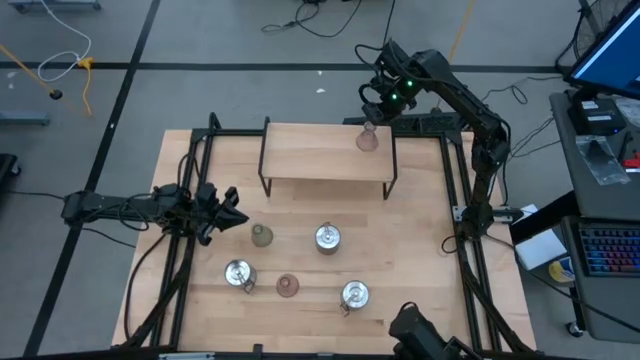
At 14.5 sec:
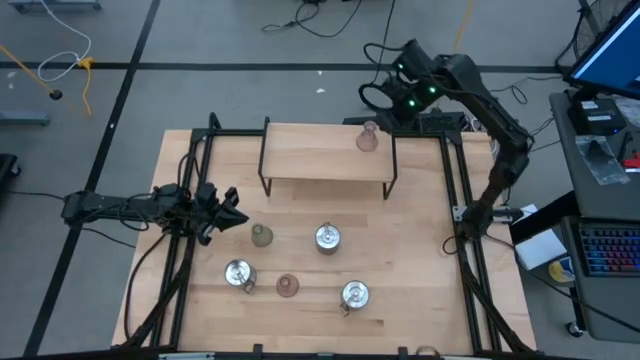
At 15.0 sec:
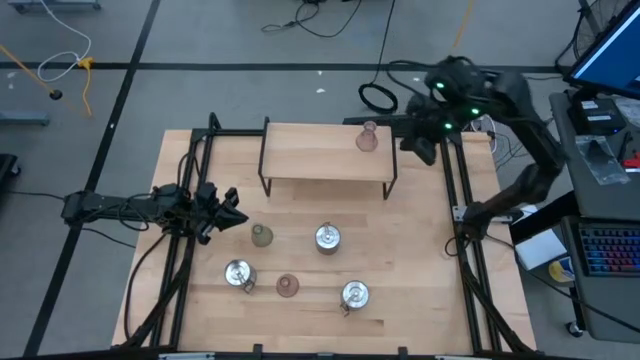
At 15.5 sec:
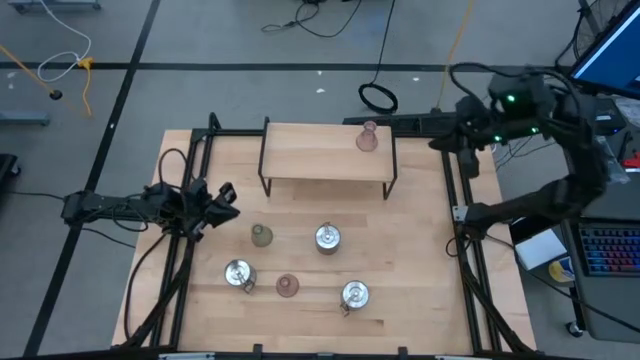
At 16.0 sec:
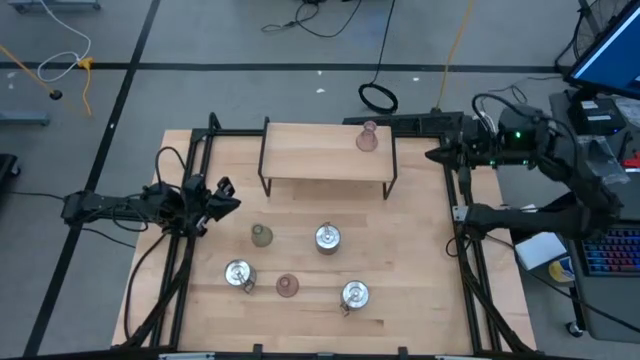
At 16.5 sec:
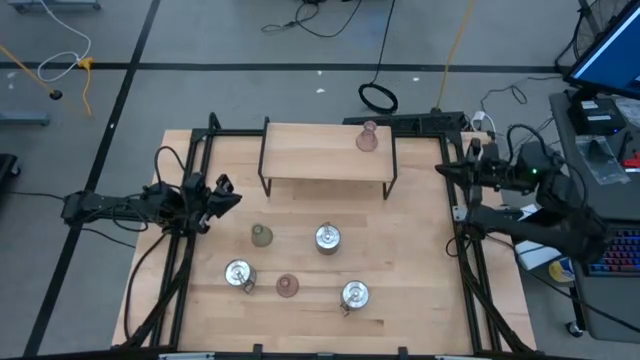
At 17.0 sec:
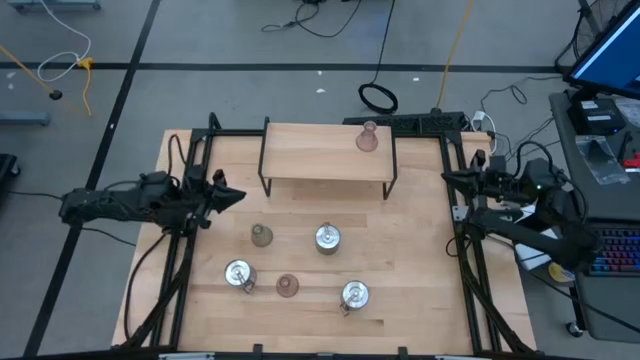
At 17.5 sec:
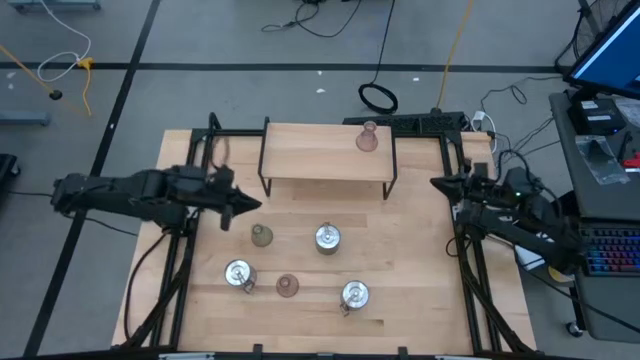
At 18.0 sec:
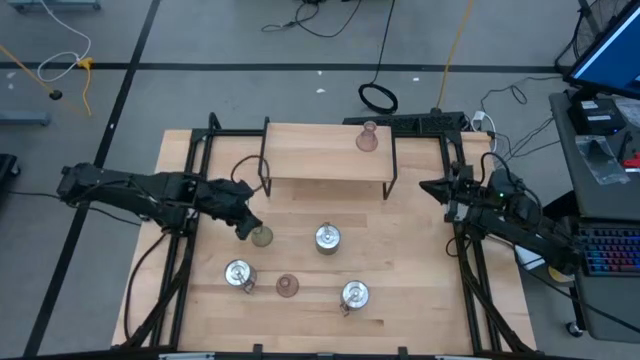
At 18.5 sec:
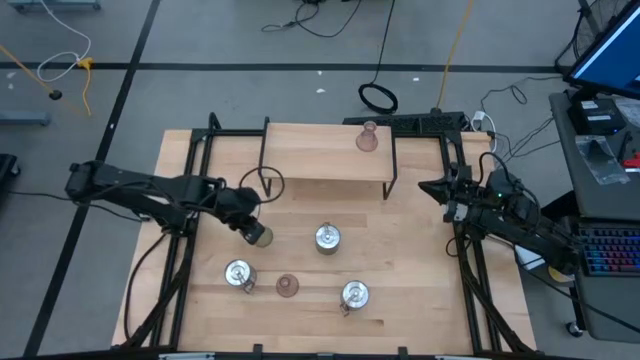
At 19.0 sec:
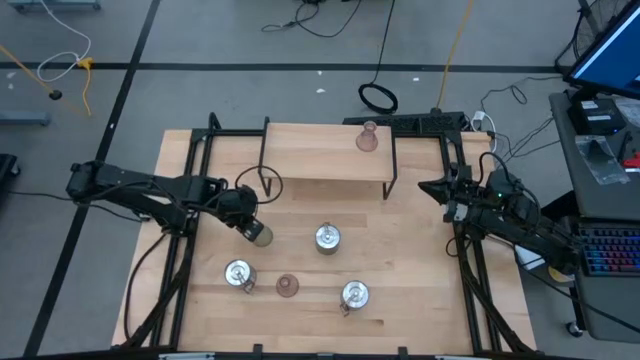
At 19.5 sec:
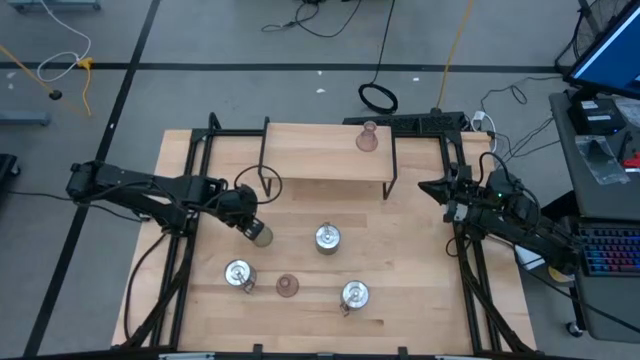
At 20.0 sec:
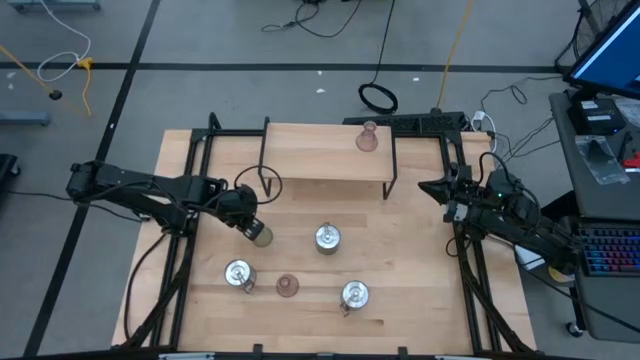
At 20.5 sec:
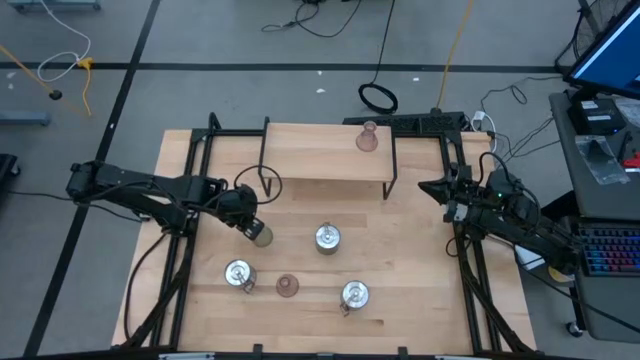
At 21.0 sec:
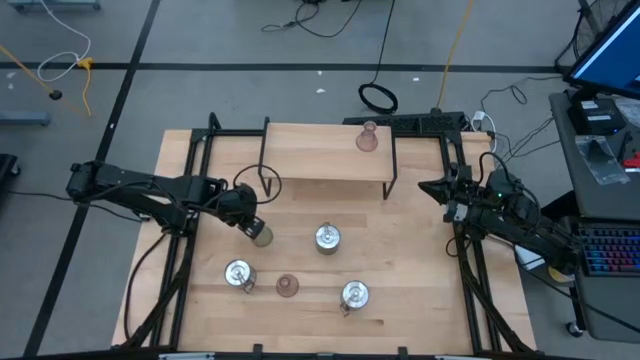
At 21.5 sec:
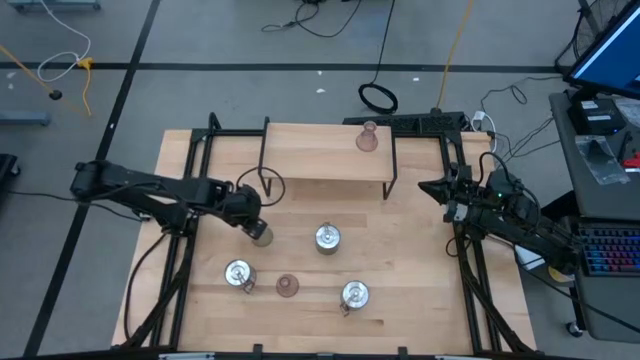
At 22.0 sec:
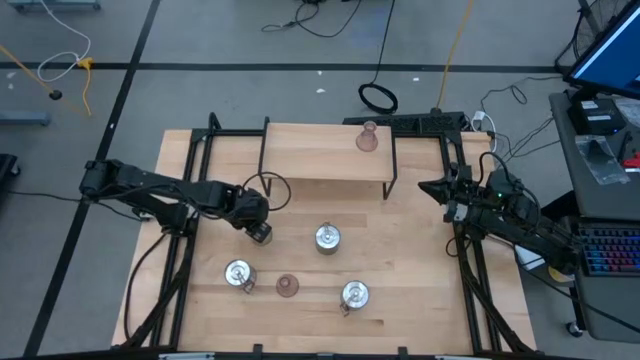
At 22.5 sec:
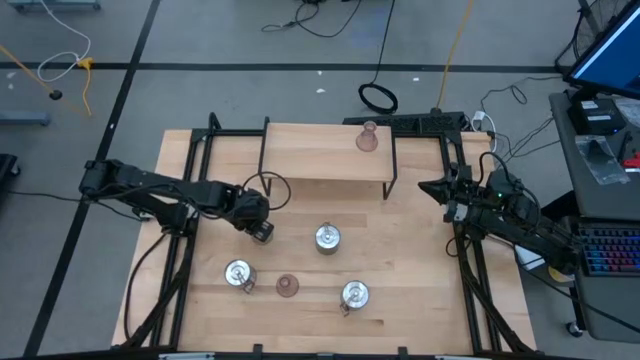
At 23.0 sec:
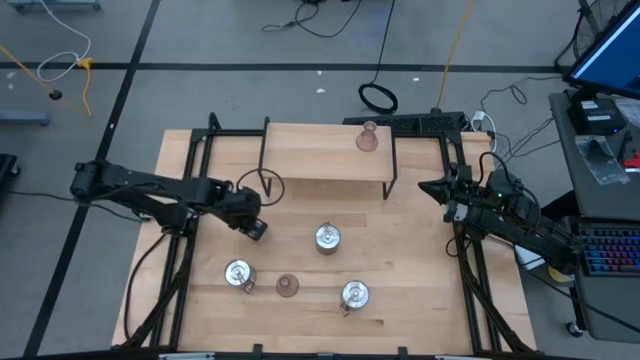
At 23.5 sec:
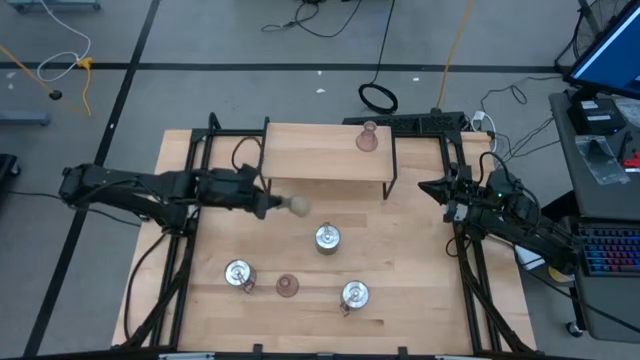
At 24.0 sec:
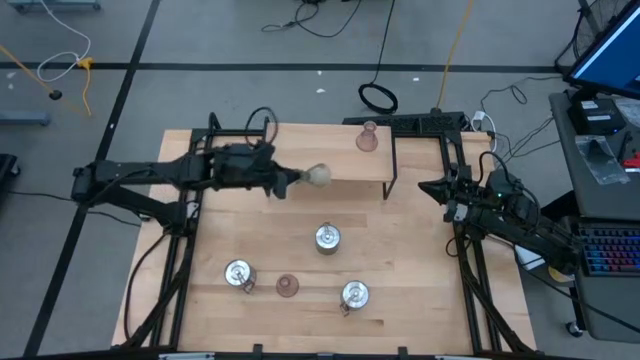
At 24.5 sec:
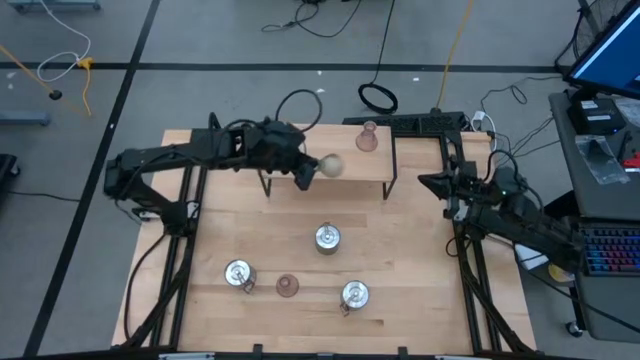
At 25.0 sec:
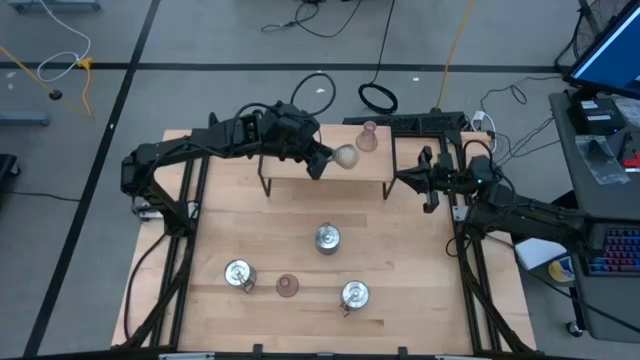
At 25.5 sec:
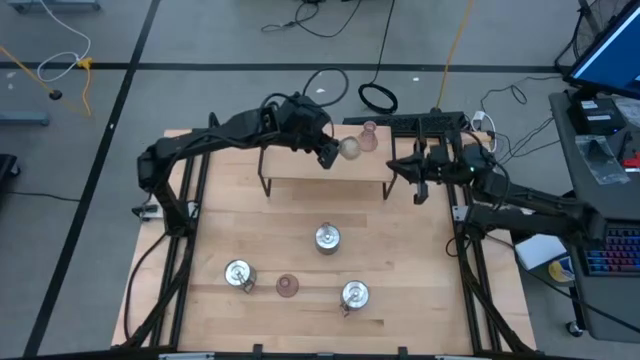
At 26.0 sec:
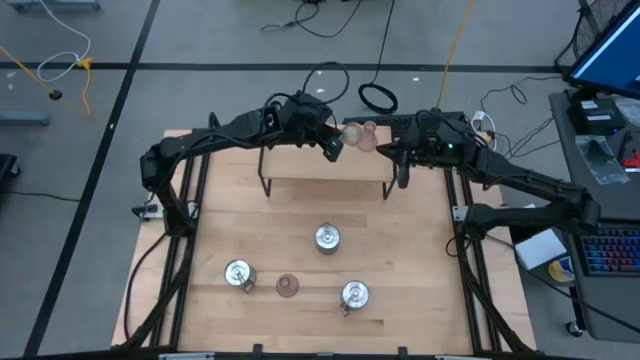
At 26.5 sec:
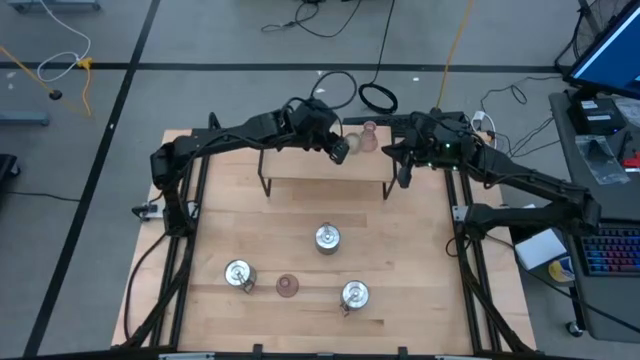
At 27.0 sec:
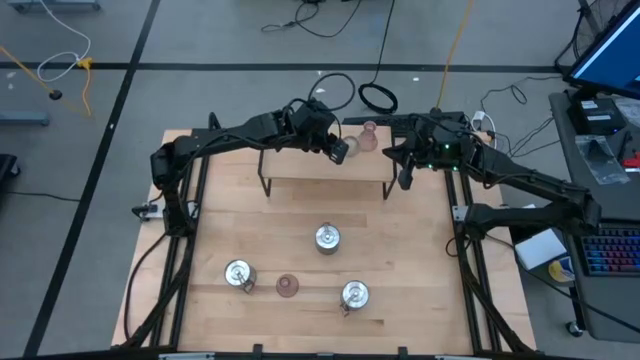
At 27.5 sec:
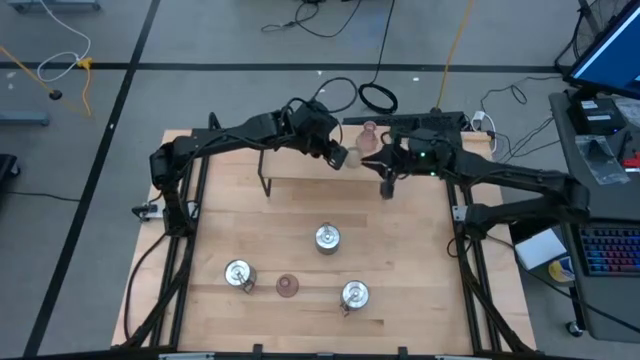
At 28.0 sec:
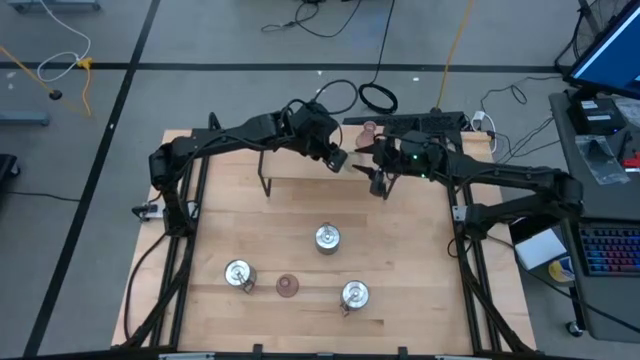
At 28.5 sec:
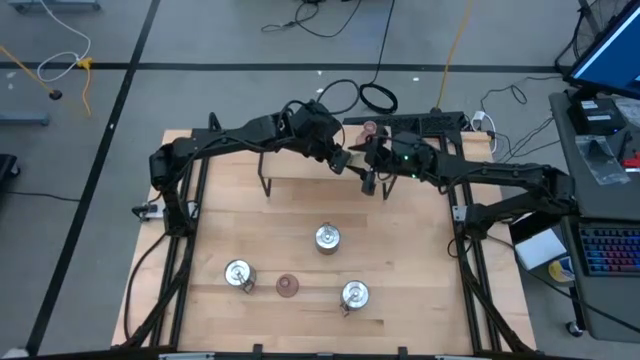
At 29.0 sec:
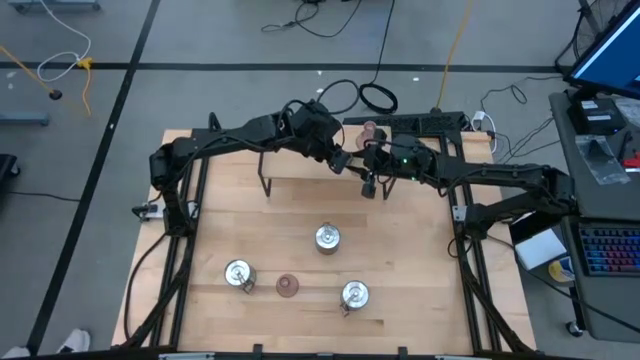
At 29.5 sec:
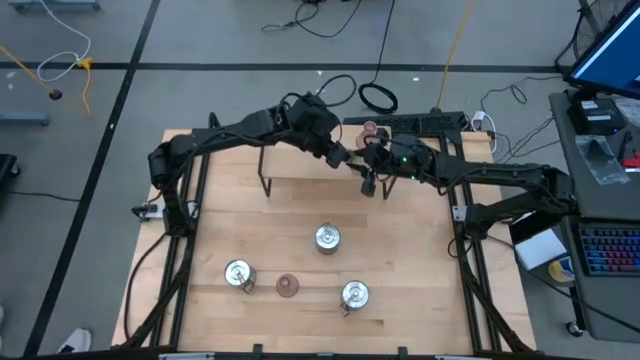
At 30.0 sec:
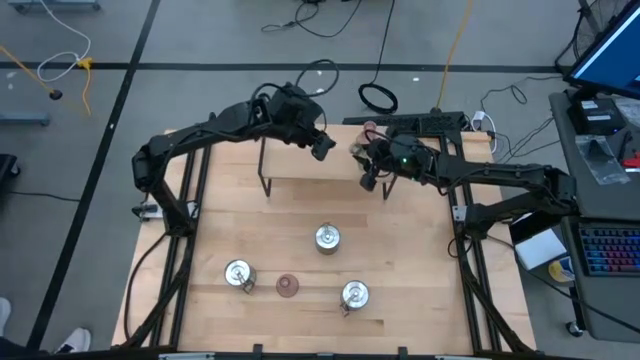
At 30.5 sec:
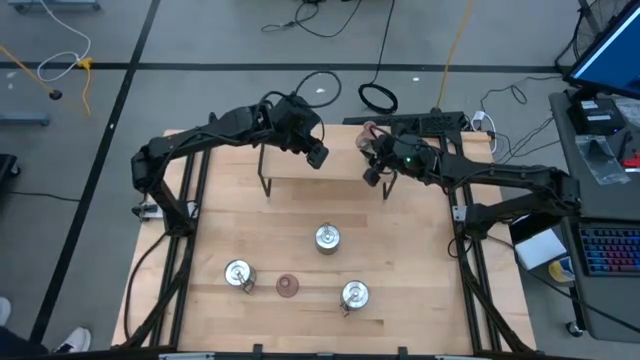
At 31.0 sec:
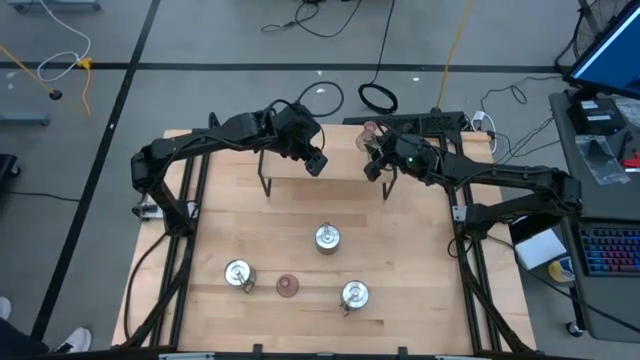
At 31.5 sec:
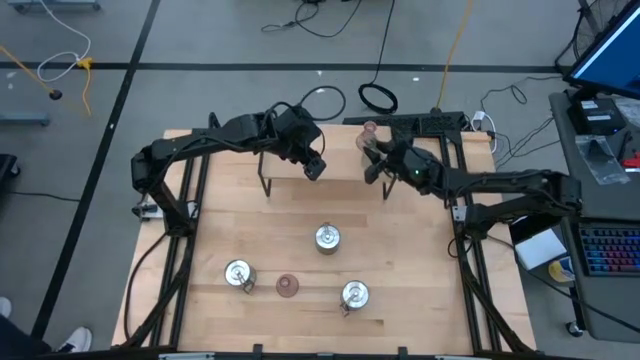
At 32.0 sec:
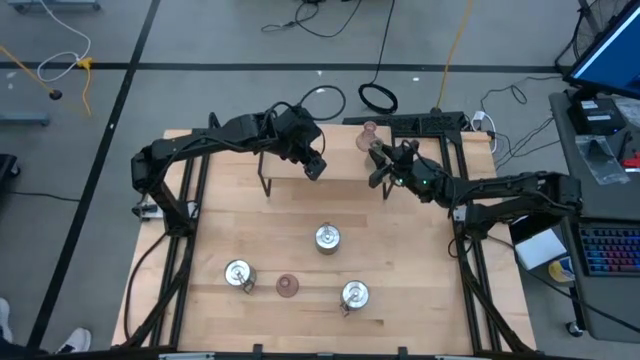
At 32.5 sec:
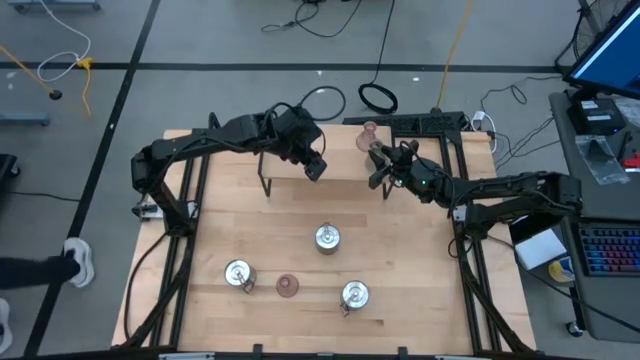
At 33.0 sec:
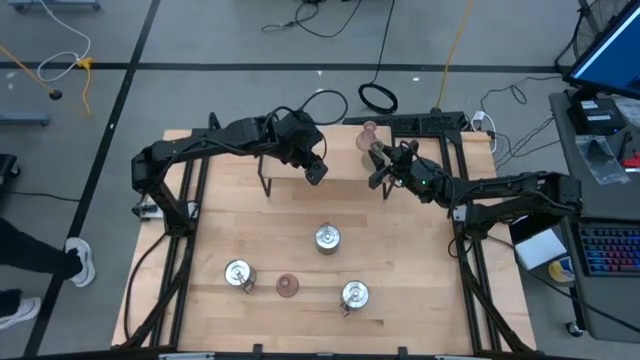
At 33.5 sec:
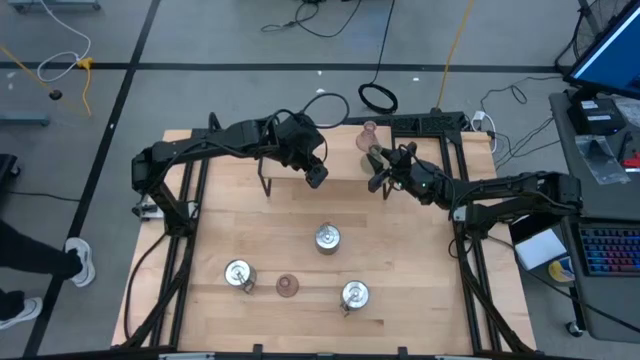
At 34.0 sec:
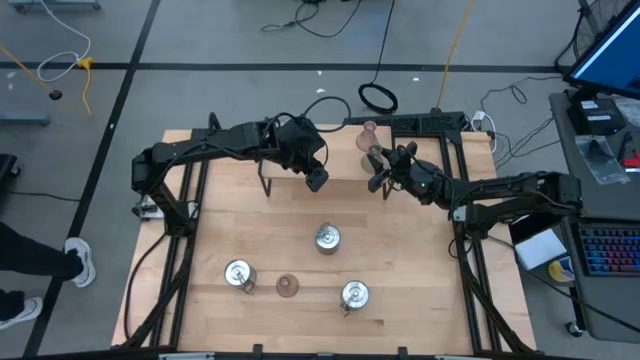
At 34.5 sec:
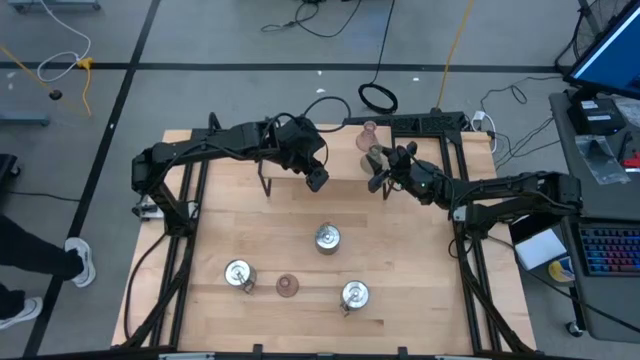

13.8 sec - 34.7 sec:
Task: Pick & Place candle stick holders
Put the green candle holder on the shelf
